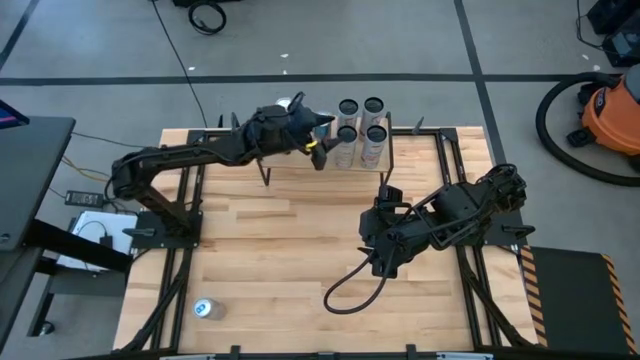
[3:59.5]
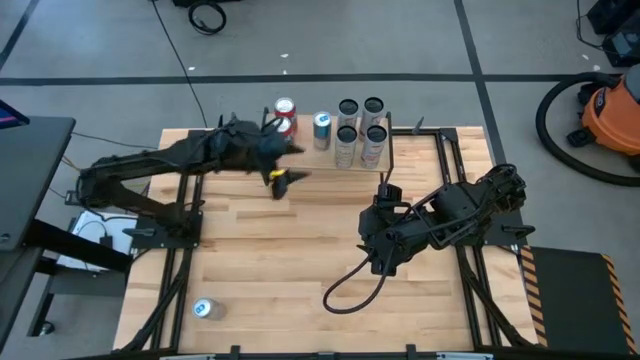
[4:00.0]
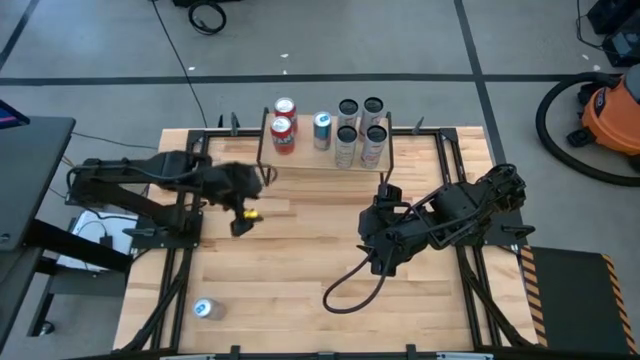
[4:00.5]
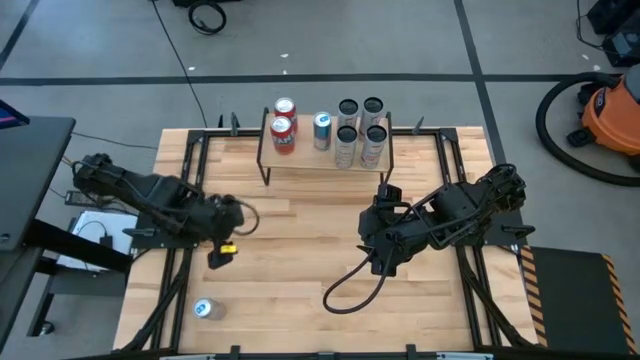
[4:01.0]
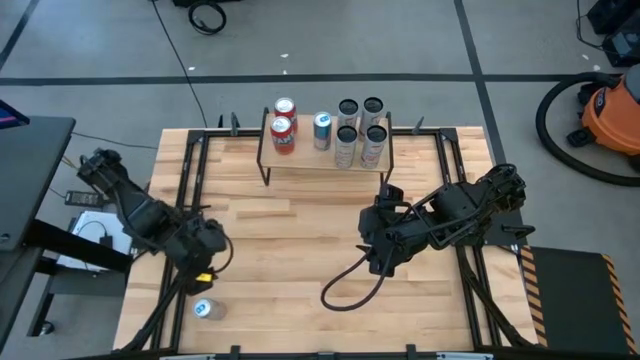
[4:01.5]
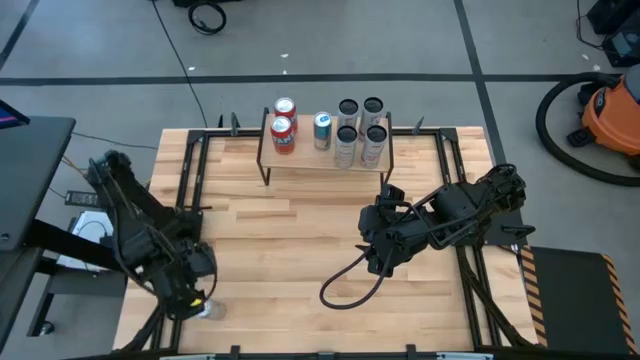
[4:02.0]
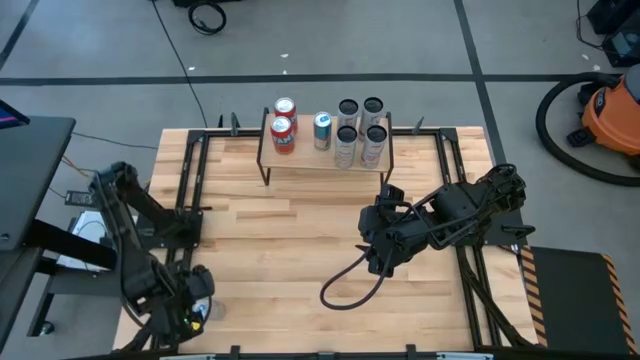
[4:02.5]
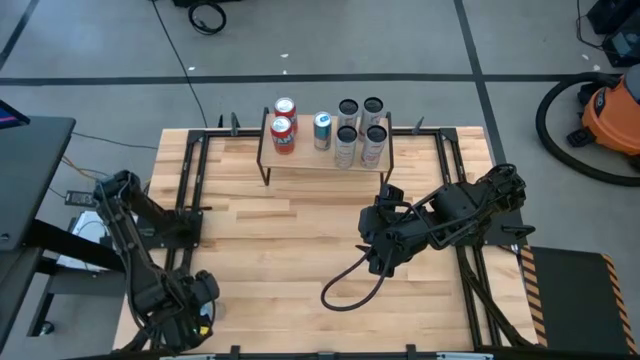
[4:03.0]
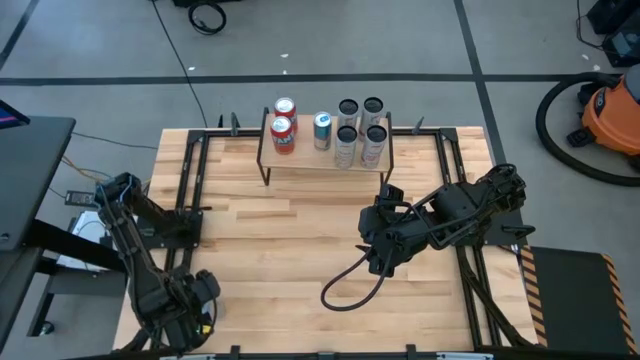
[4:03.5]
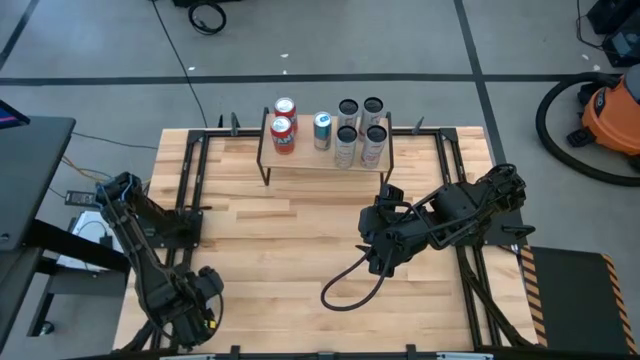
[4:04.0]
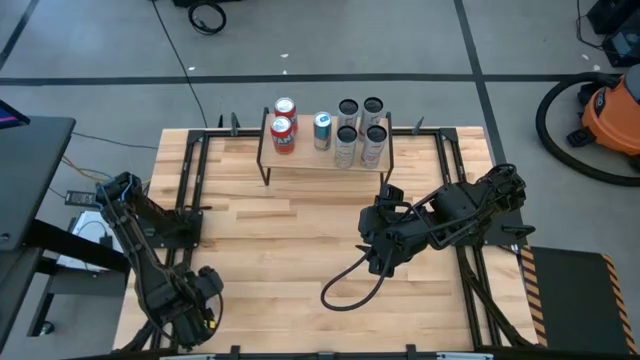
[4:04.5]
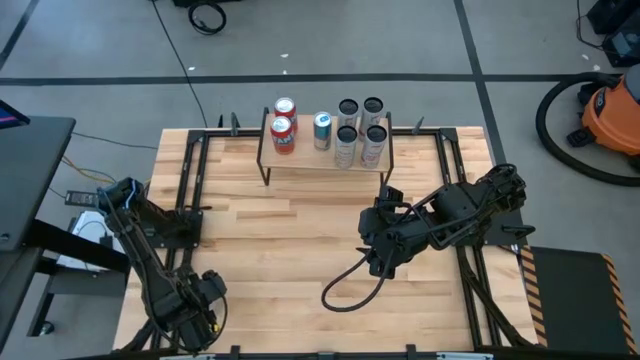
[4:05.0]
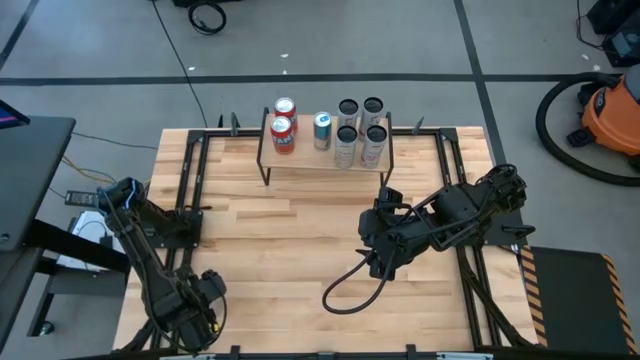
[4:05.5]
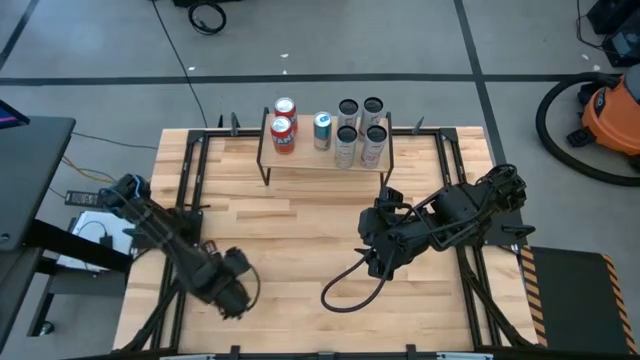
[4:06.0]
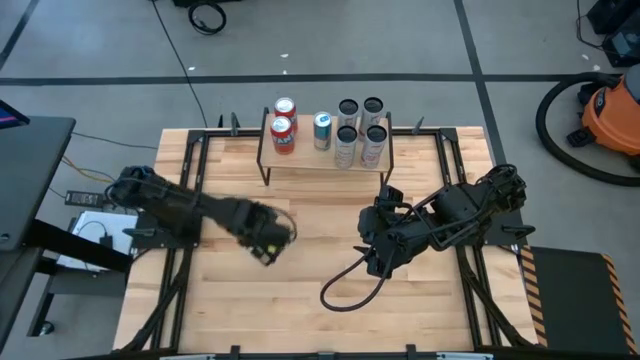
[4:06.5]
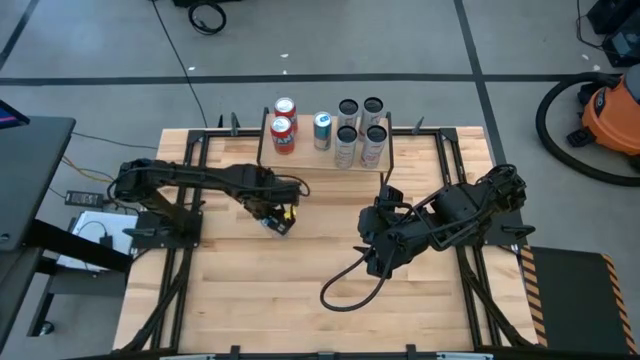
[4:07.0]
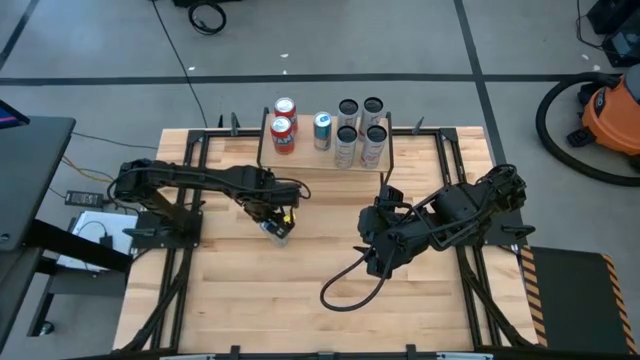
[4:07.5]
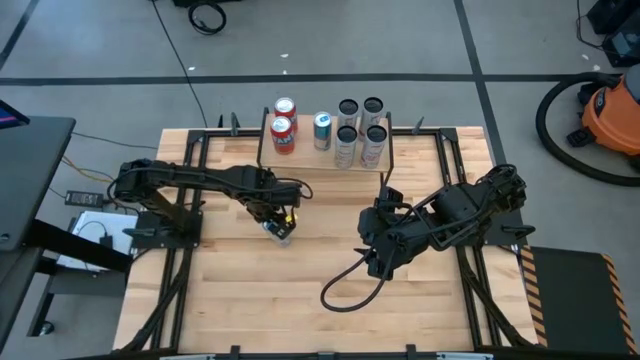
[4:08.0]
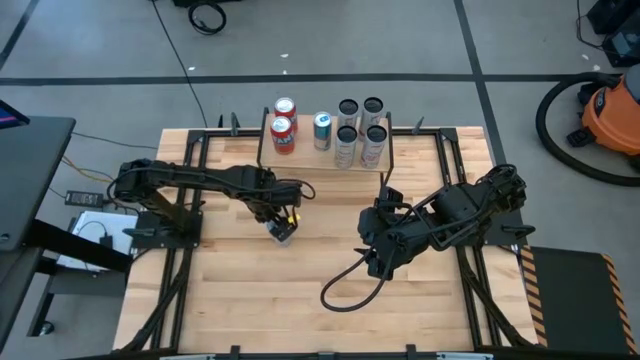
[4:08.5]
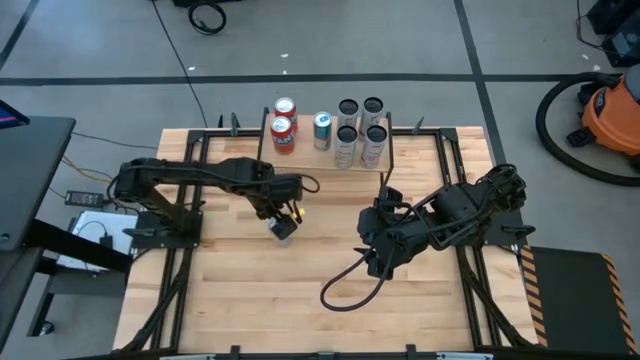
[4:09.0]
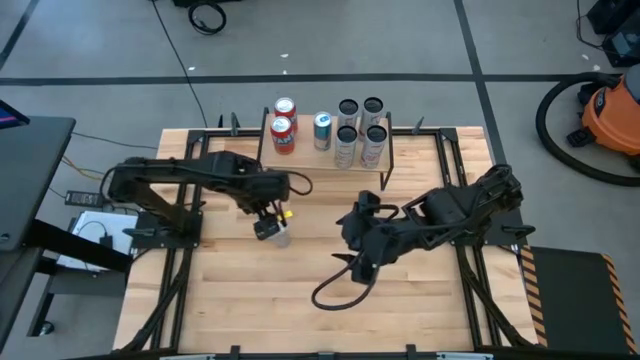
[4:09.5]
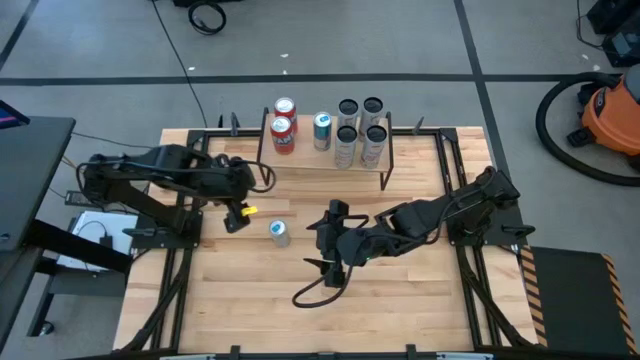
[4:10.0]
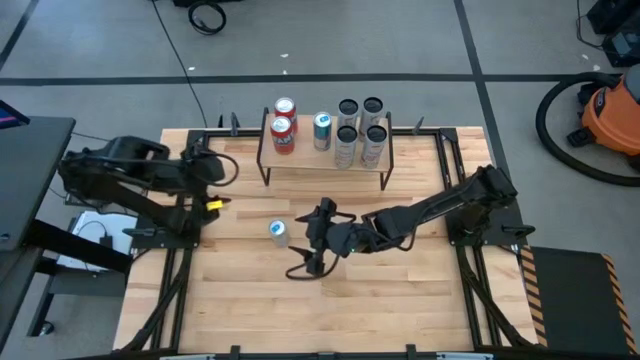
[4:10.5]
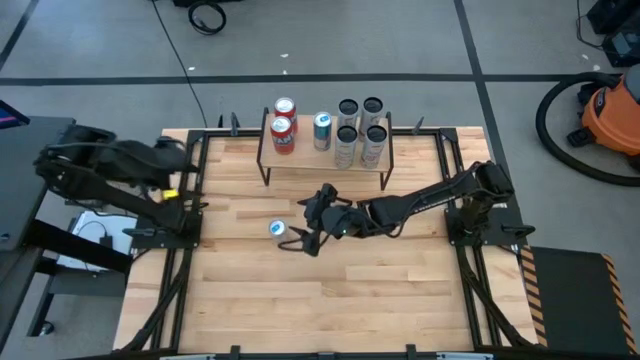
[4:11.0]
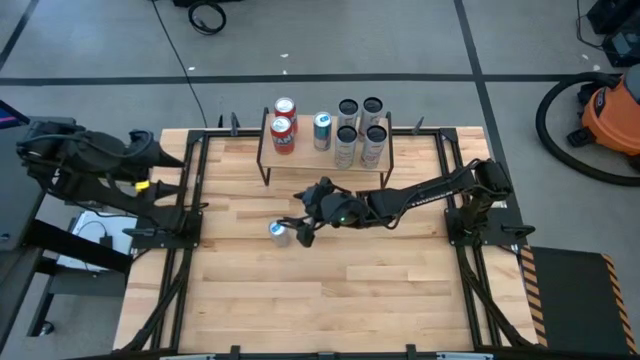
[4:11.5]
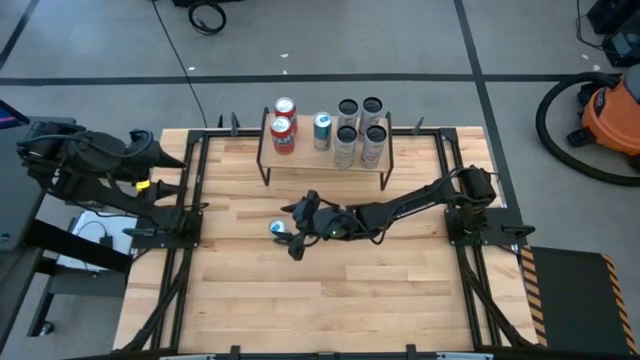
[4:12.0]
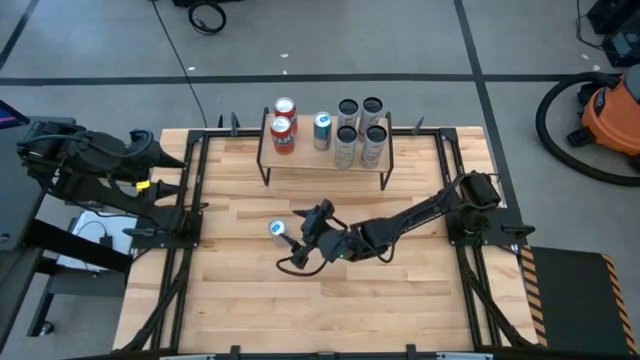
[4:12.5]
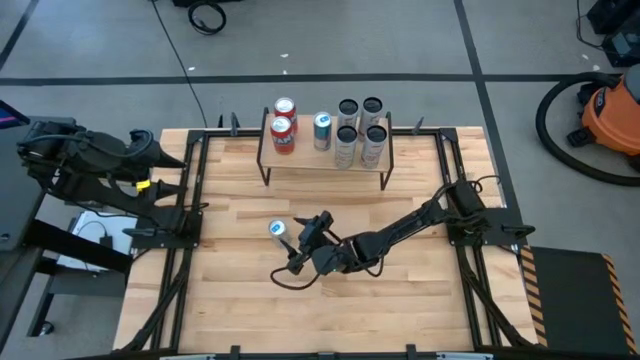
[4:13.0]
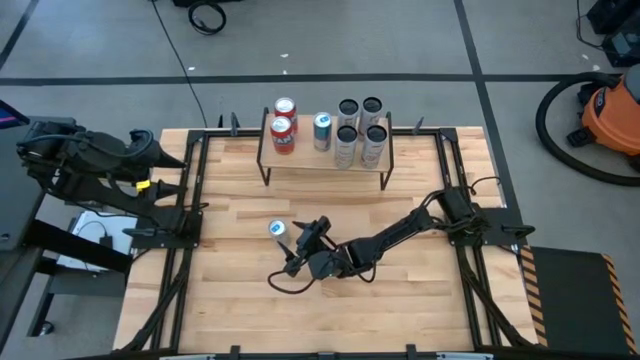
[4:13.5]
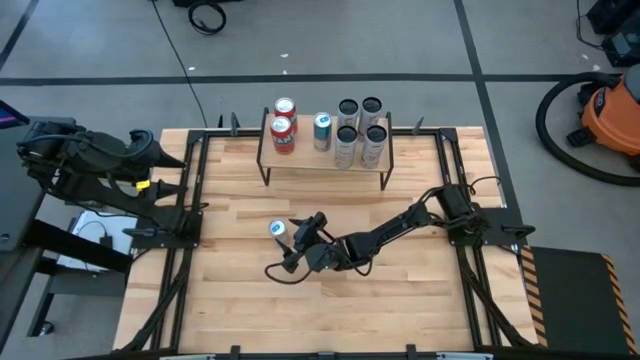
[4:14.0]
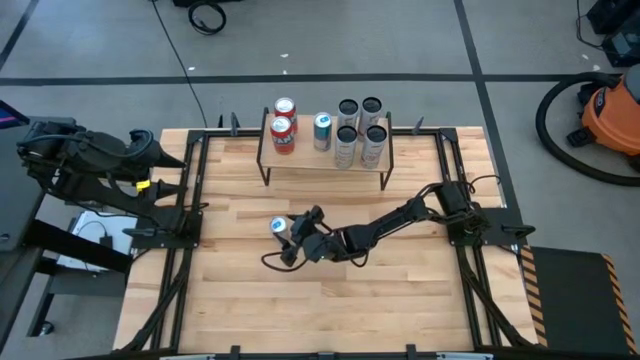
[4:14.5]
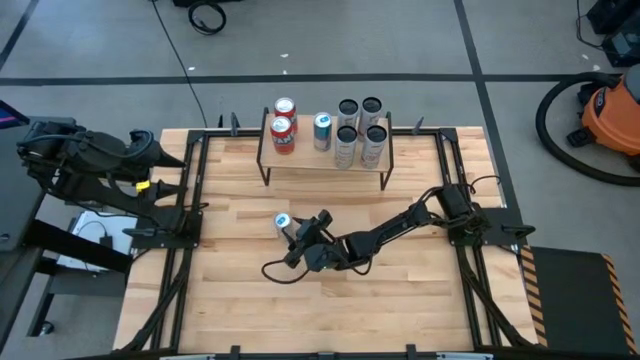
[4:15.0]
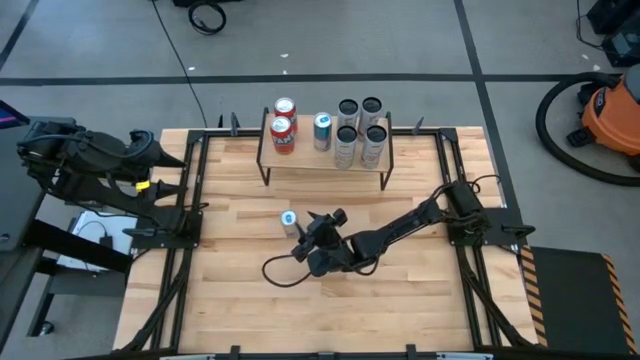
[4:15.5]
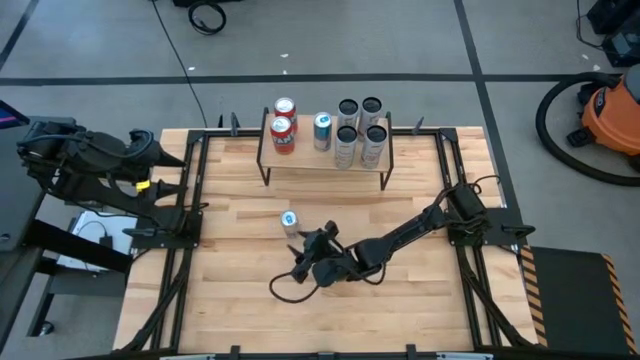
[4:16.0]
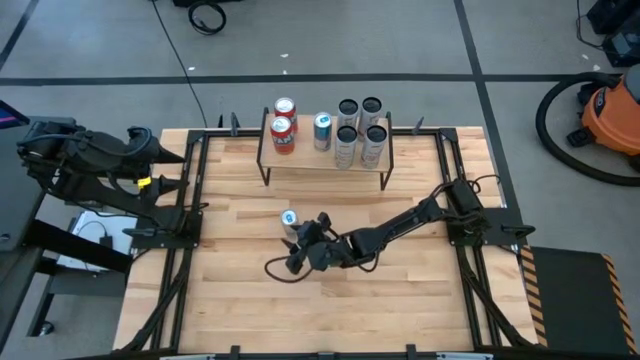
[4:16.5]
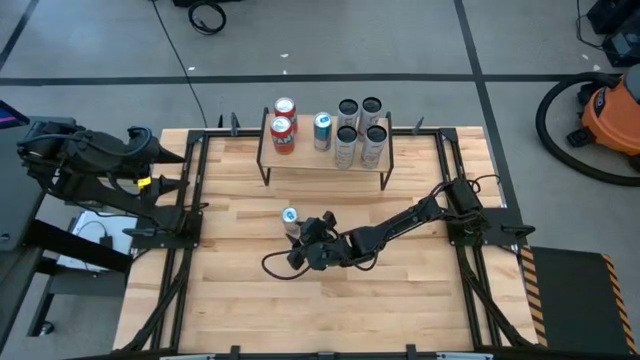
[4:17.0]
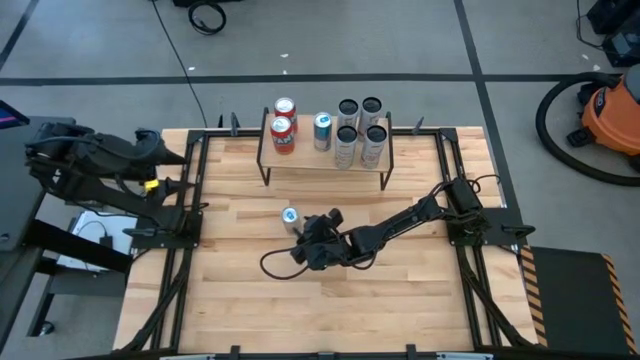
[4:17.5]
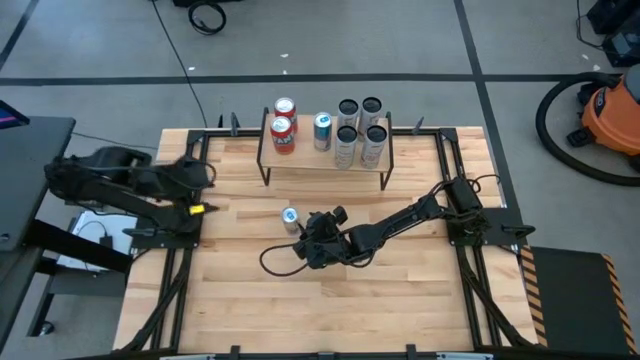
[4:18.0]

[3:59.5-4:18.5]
Task: Place canned beverage on shelf
Put the blue soda can on the shelf aligned with the other blue soda can
